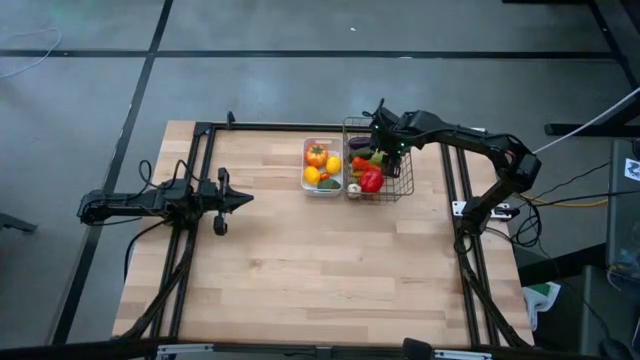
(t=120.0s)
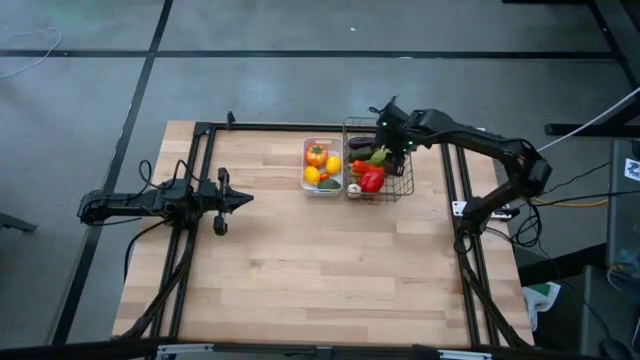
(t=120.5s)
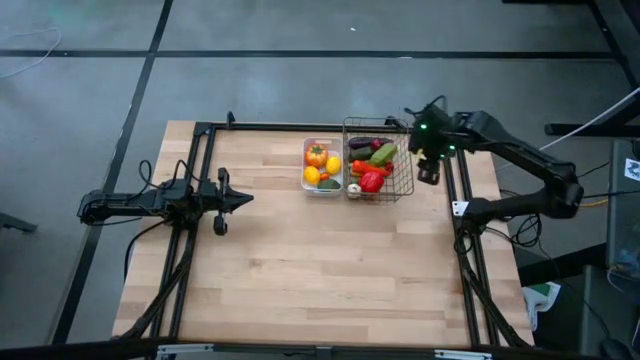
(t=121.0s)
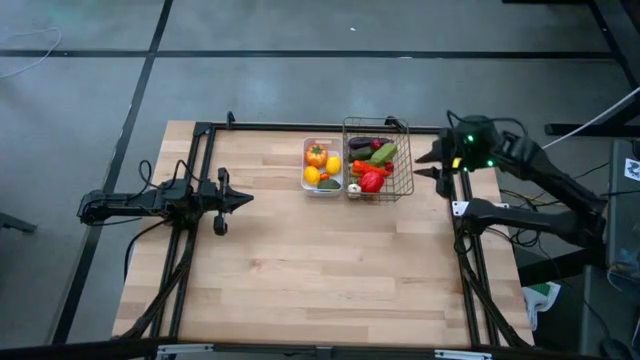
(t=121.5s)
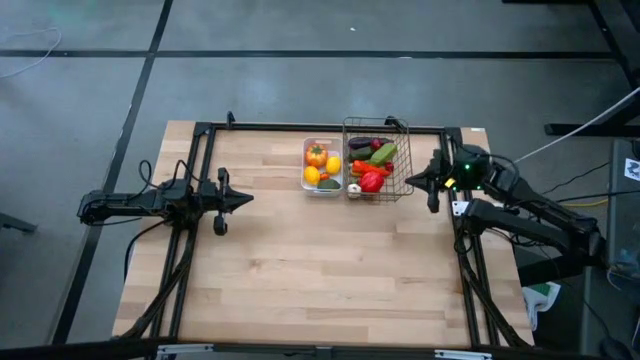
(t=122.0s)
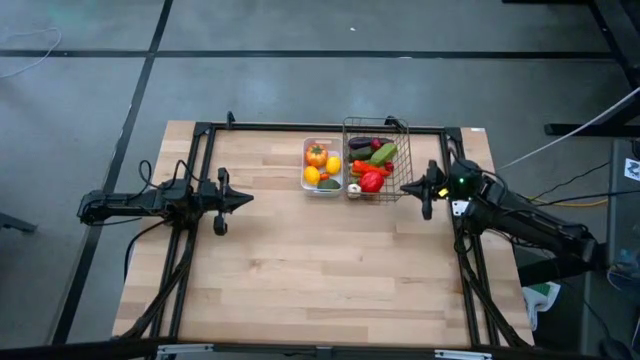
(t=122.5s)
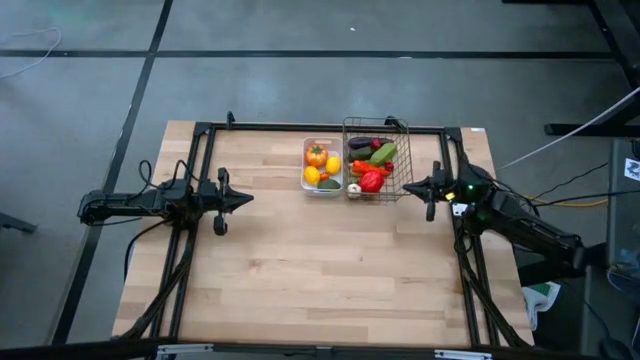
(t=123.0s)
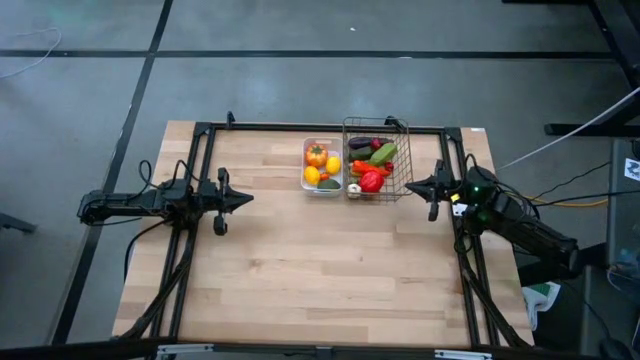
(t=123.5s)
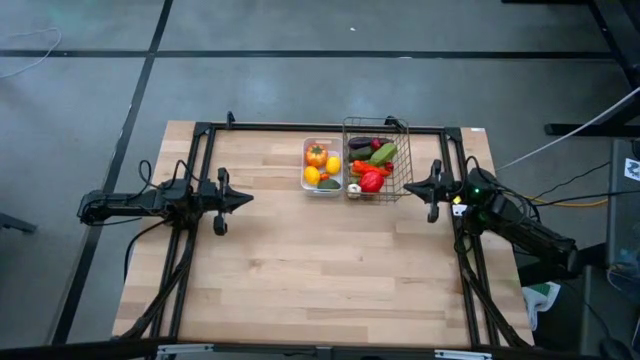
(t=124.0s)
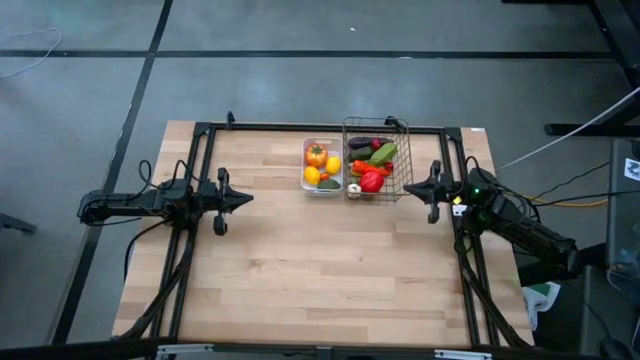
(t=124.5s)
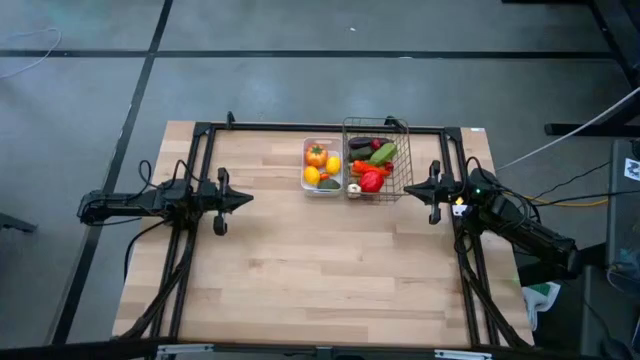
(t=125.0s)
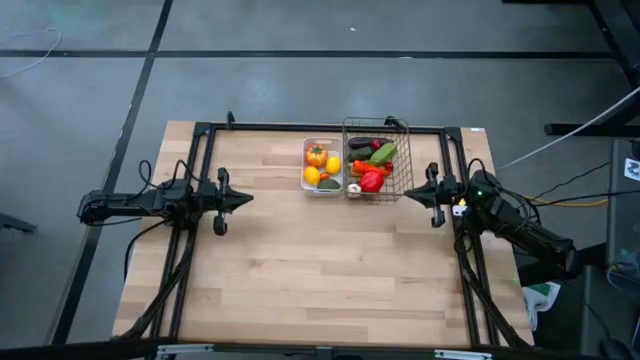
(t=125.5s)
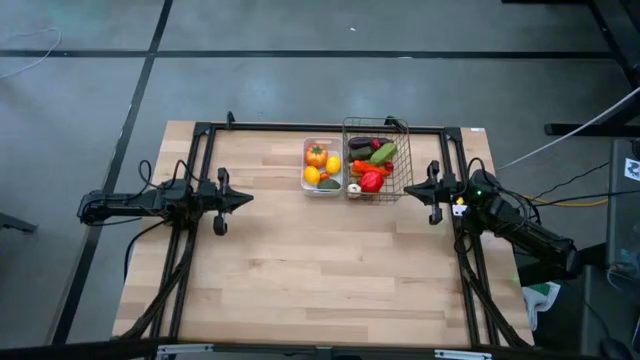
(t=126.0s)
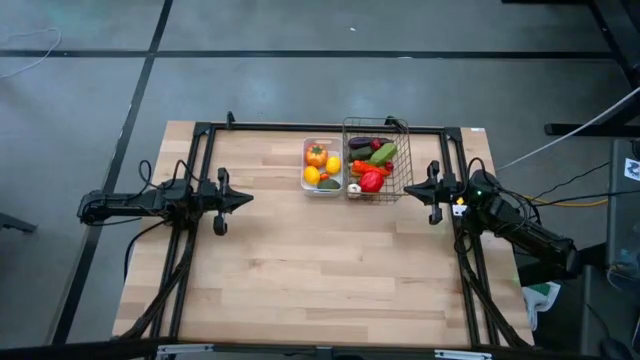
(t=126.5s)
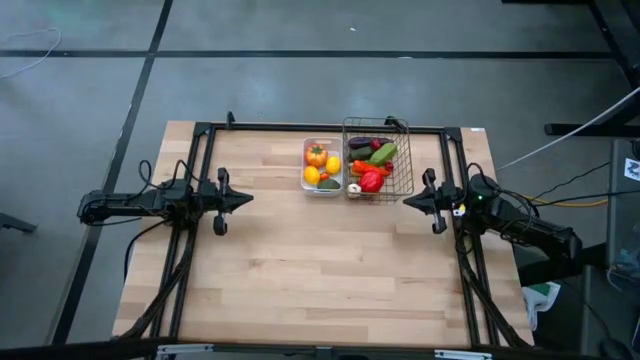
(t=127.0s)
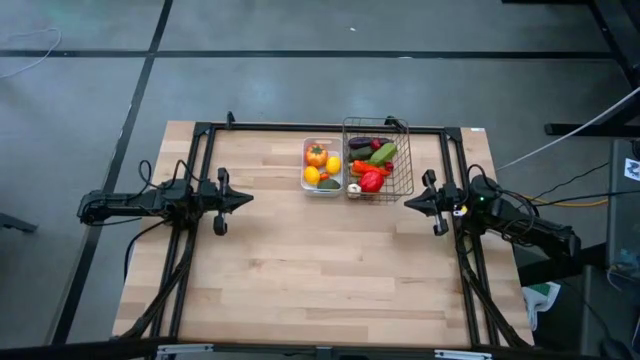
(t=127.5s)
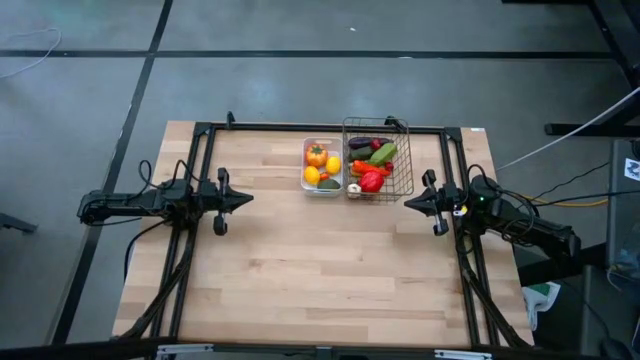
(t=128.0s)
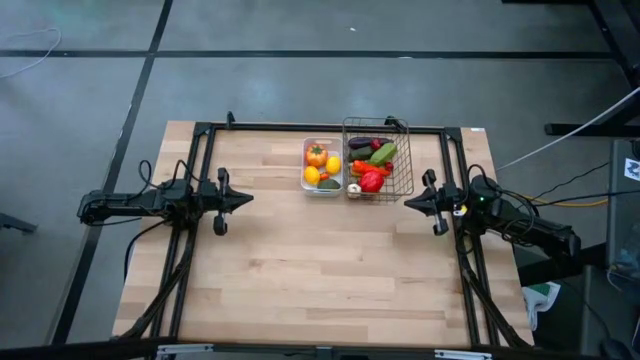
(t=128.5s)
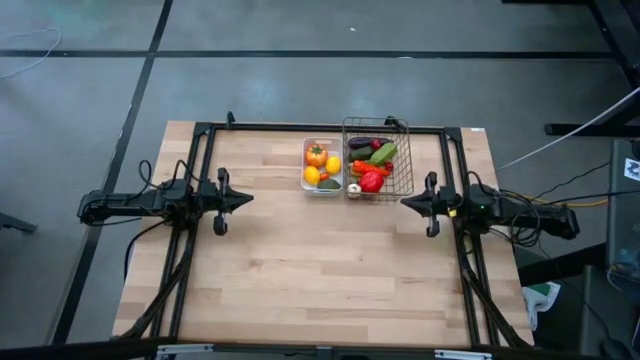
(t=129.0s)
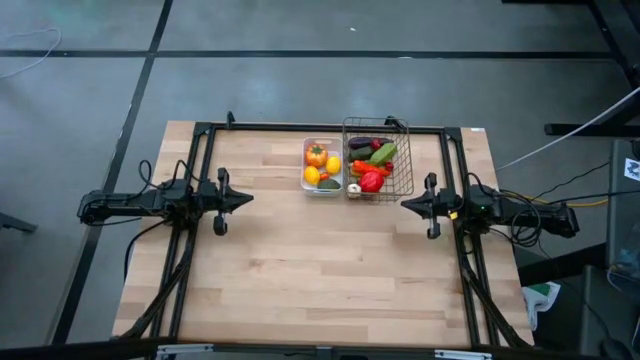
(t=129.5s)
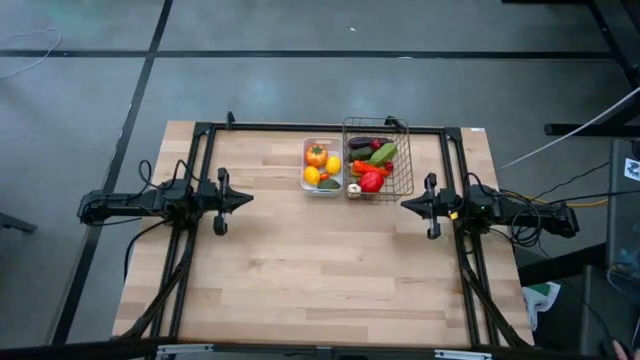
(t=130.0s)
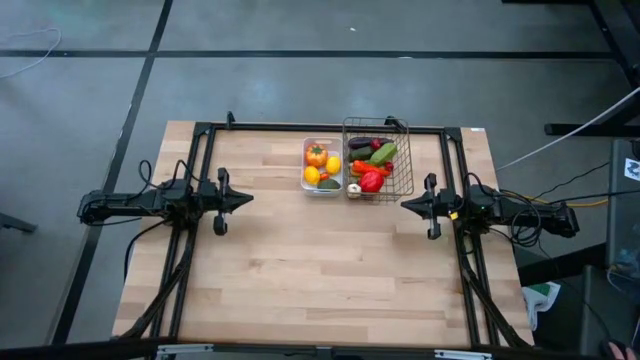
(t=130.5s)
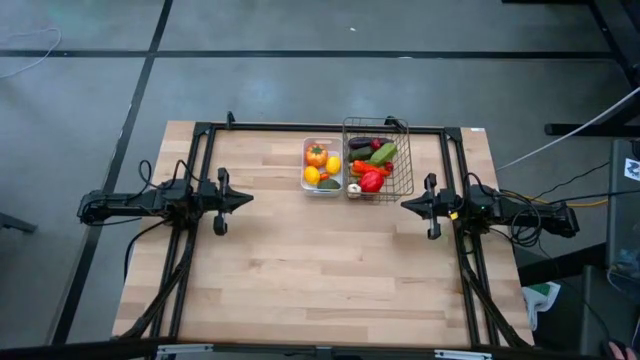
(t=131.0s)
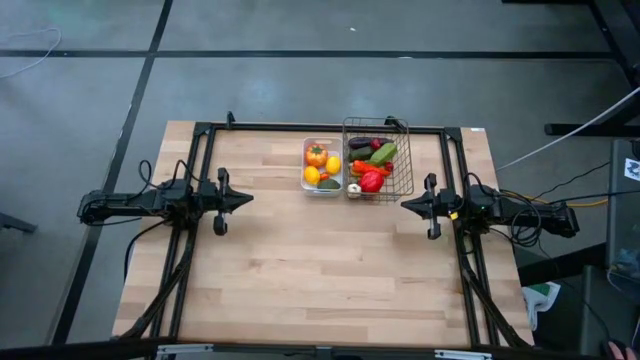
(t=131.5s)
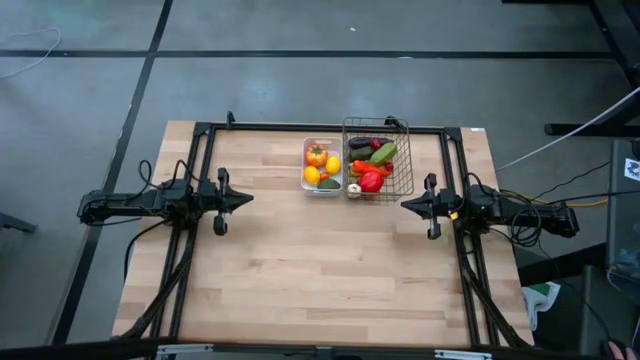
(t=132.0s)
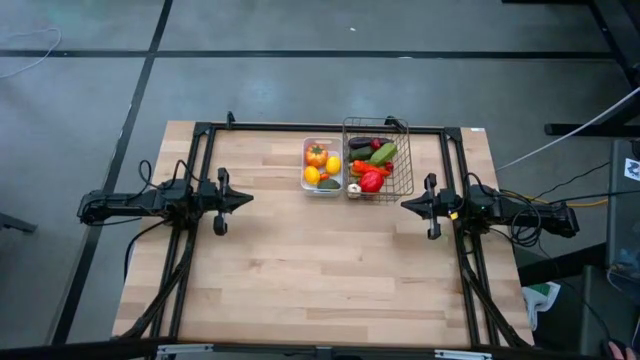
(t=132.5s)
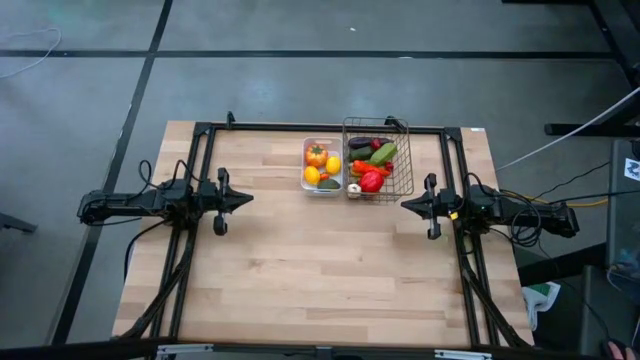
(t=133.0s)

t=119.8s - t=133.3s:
Task: Sort produce into baskets
Return to Home Position

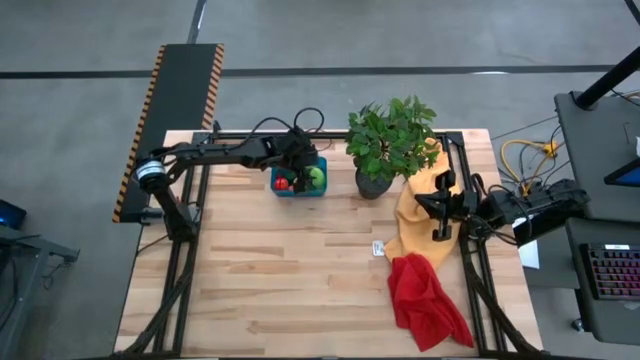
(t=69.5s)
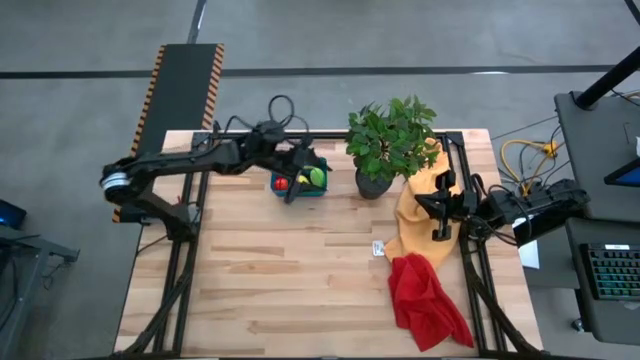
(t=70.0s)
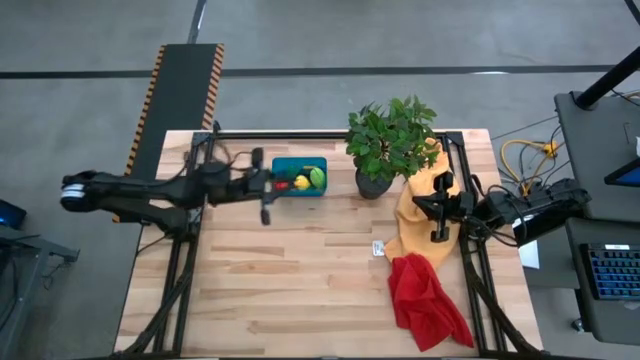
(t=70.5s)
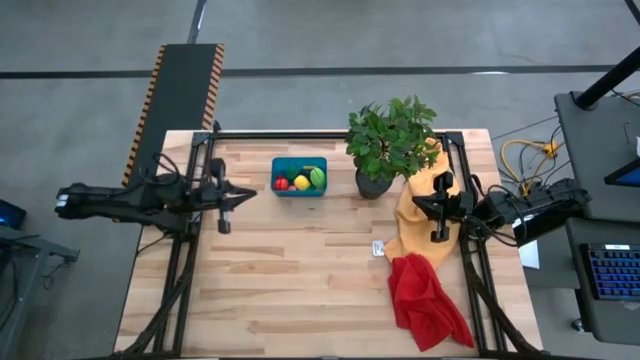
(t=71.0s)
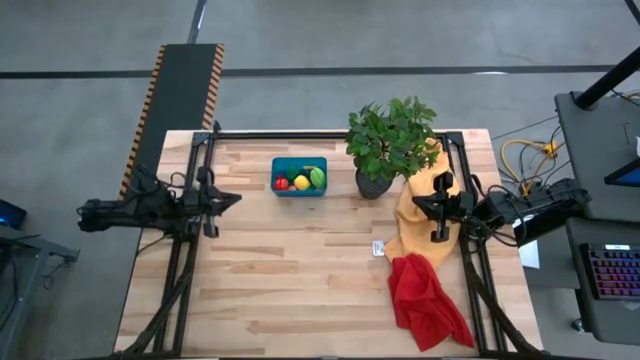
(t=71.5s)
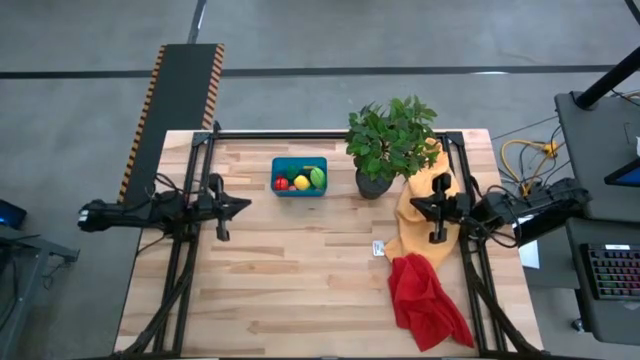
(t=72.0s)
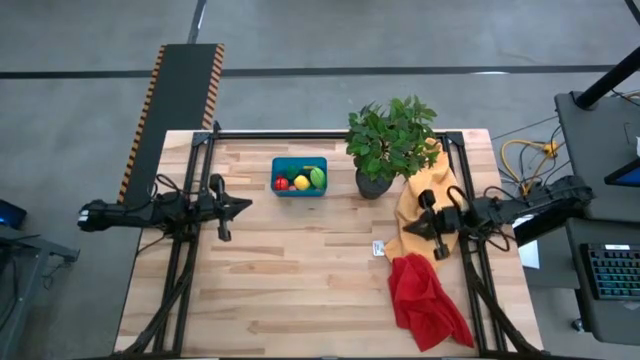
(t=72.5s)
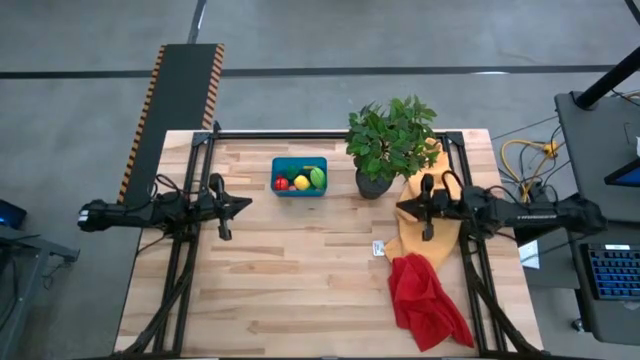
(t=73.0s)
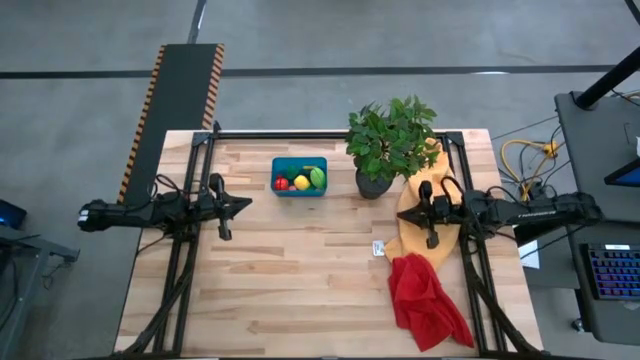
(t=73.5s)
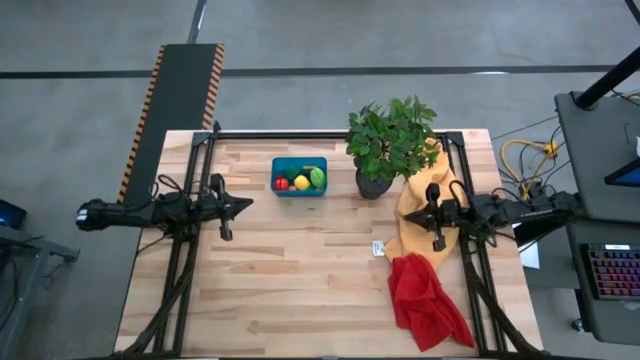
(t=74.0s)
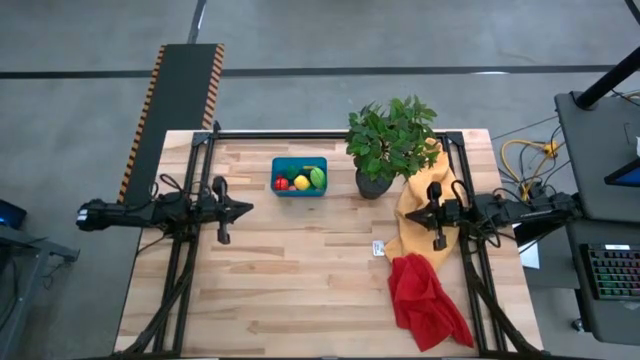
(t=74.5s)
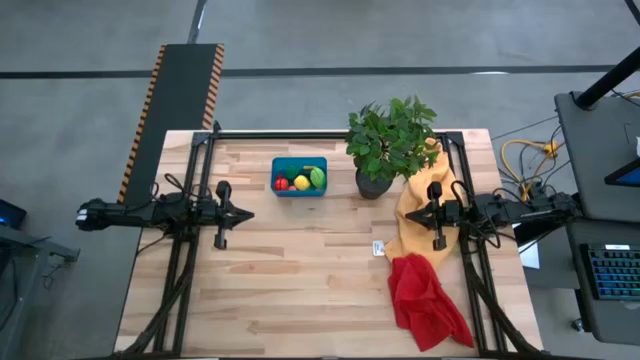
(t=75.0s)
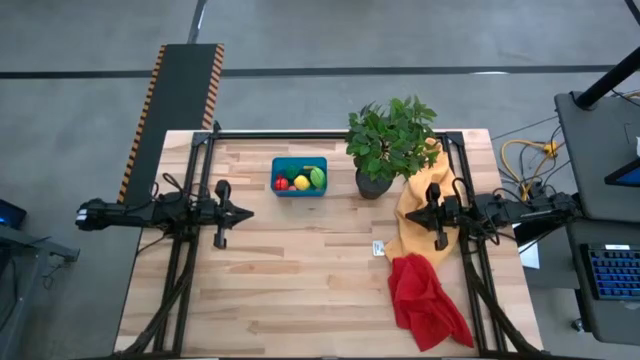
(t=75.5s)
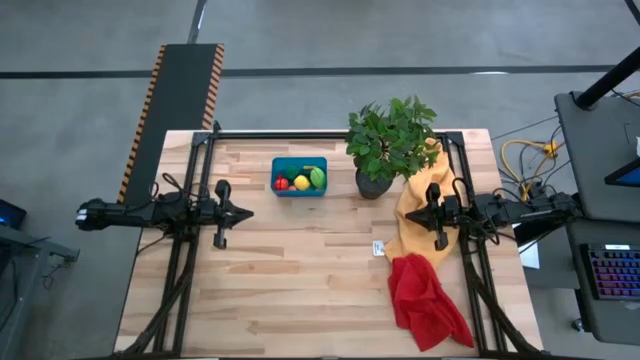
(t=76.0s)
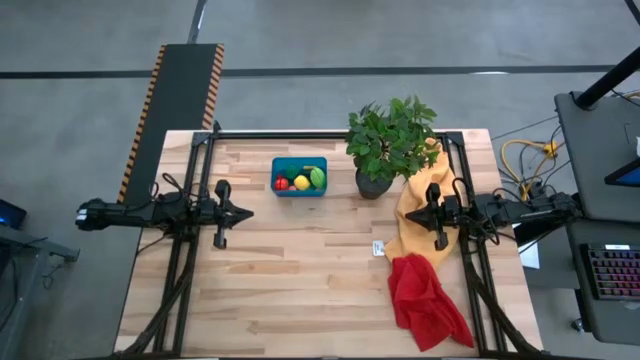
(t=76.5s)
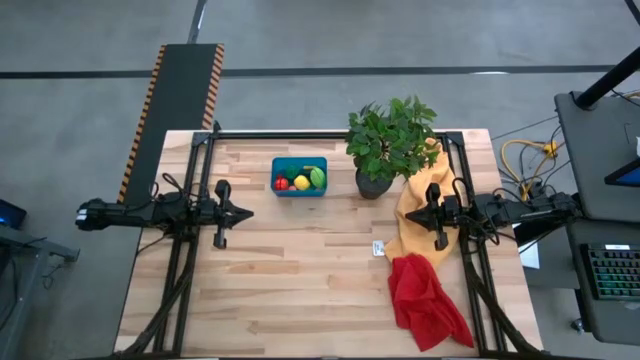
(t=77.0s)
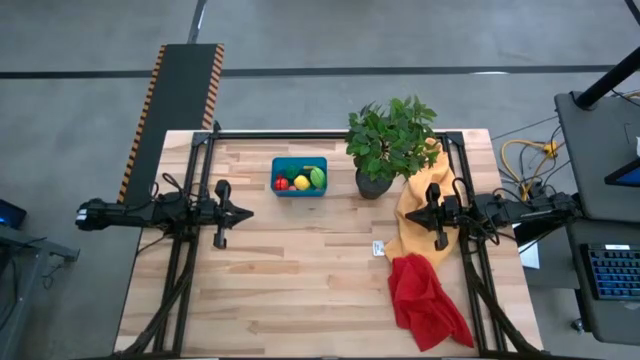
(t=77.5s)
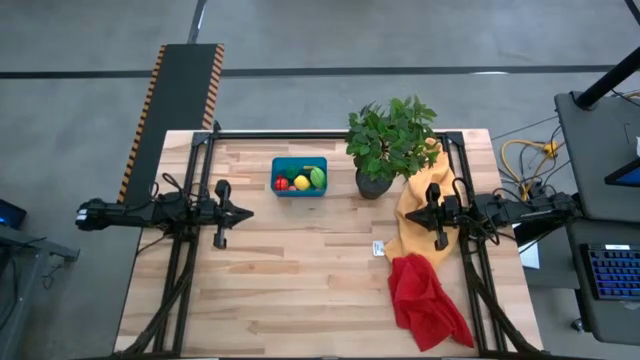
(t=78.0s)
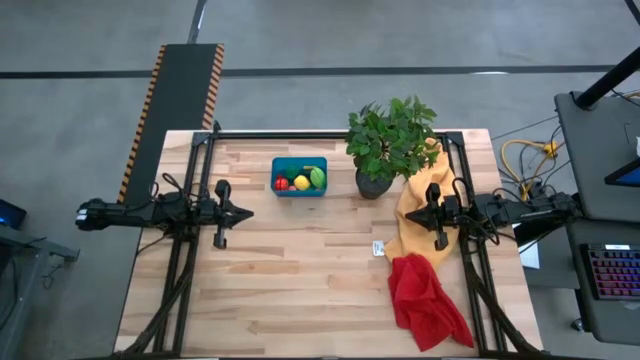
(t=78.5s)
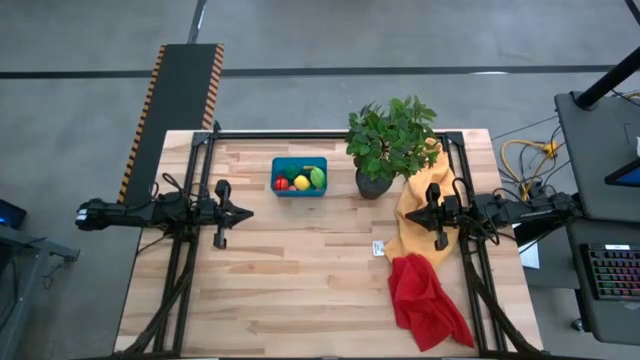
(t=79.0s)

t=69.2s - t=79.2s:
Task: Pick and placing Produce into tupperware
Return to Home Position
